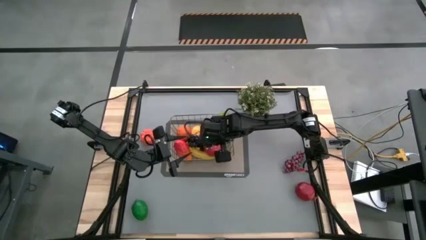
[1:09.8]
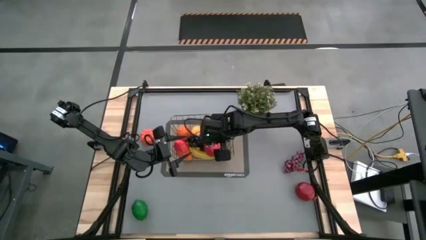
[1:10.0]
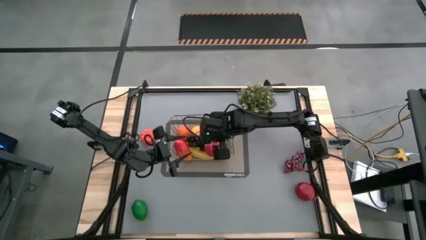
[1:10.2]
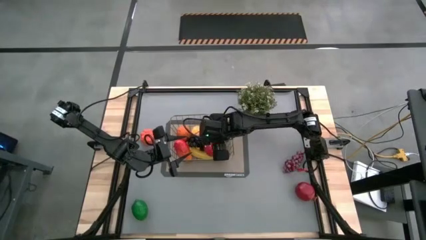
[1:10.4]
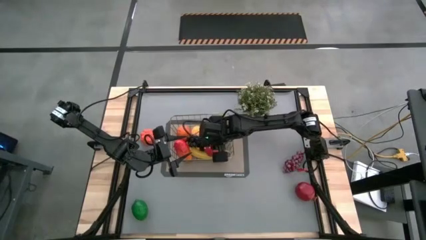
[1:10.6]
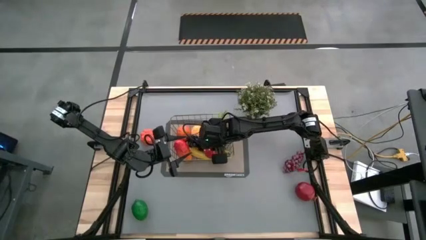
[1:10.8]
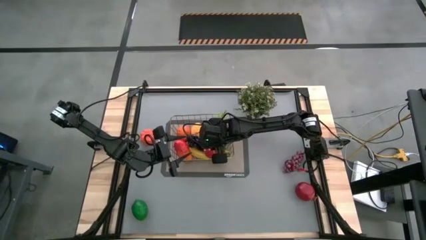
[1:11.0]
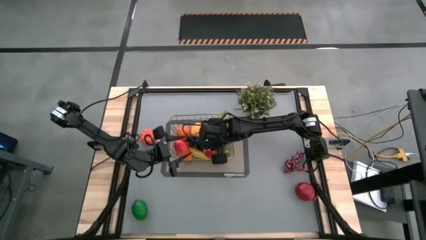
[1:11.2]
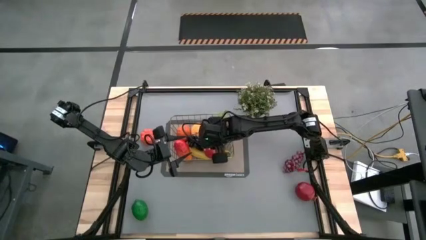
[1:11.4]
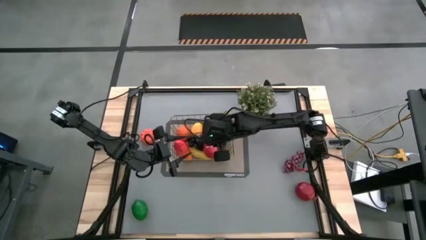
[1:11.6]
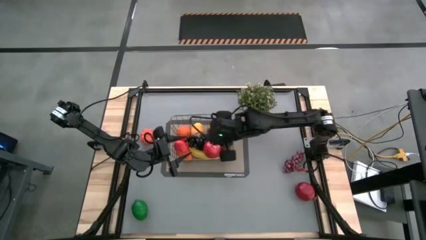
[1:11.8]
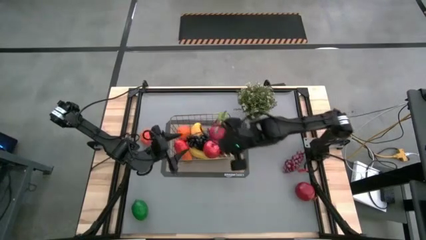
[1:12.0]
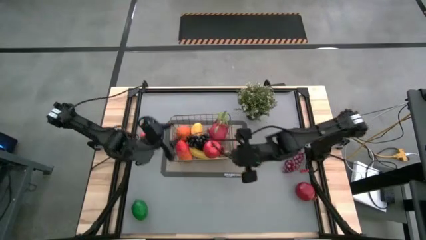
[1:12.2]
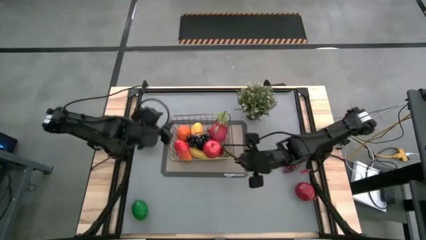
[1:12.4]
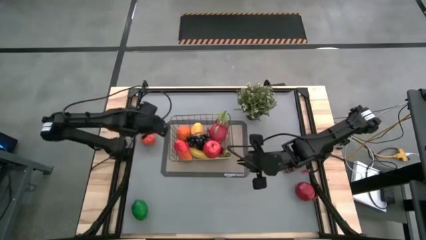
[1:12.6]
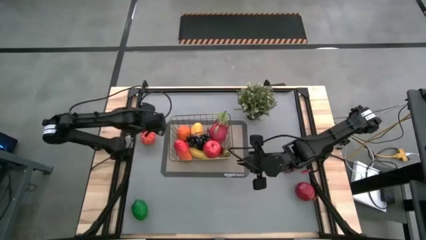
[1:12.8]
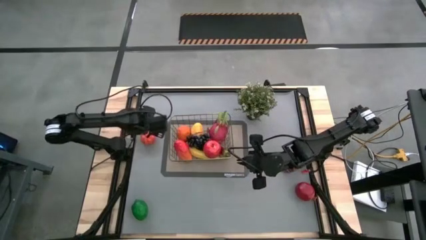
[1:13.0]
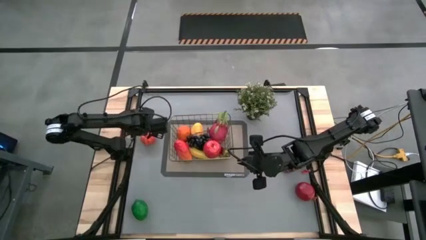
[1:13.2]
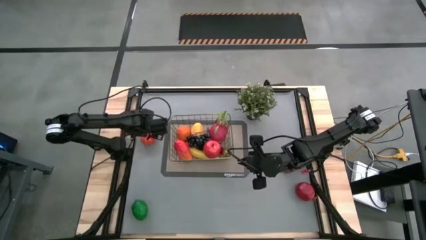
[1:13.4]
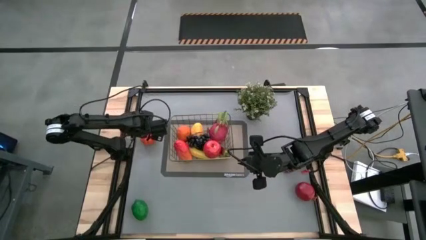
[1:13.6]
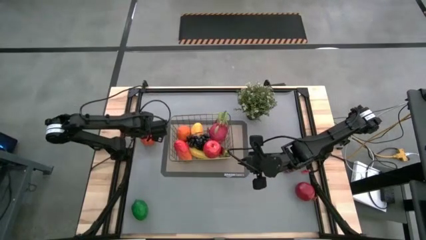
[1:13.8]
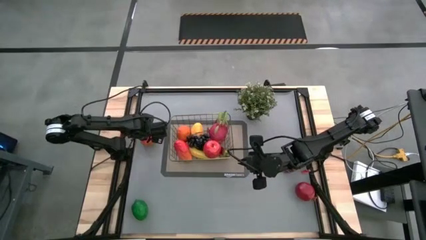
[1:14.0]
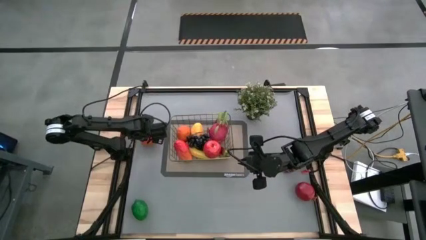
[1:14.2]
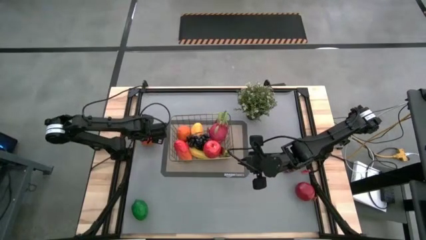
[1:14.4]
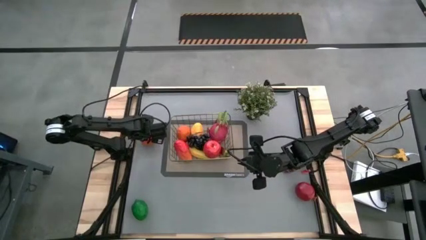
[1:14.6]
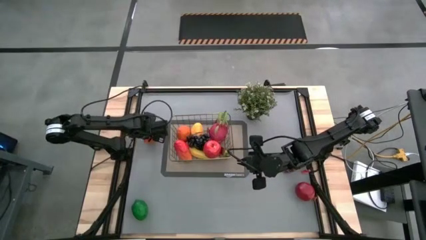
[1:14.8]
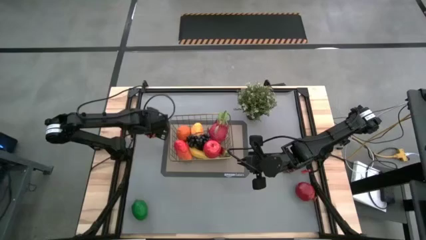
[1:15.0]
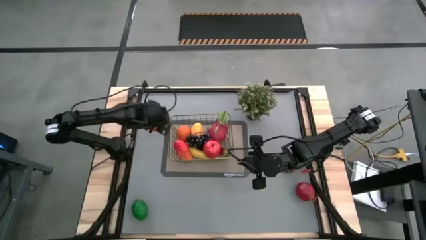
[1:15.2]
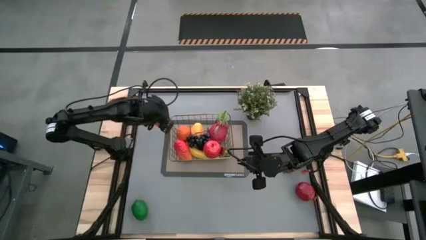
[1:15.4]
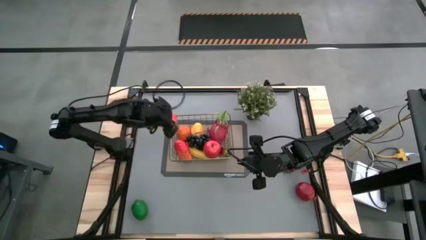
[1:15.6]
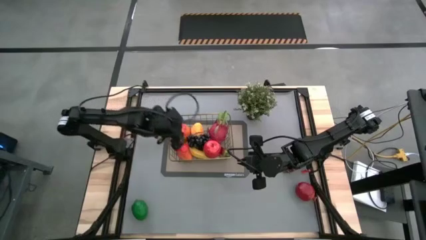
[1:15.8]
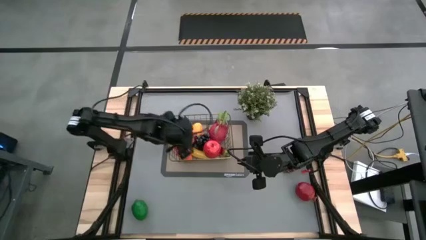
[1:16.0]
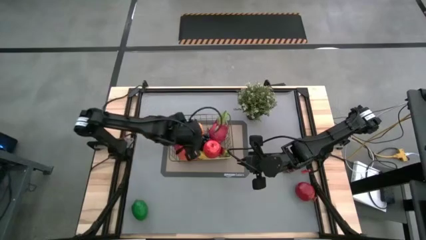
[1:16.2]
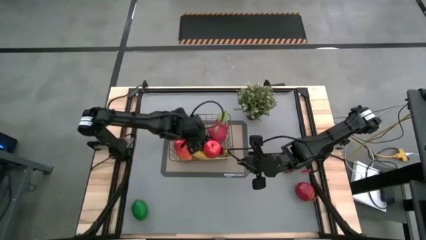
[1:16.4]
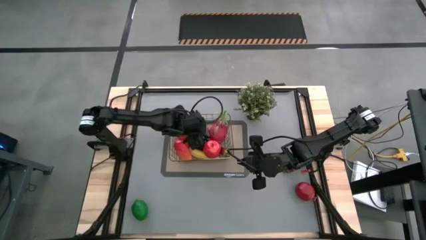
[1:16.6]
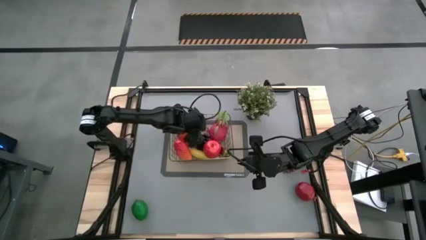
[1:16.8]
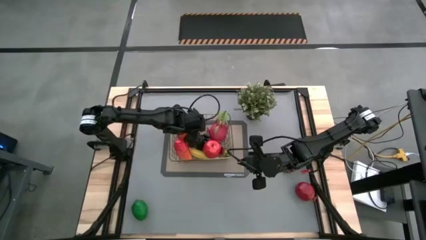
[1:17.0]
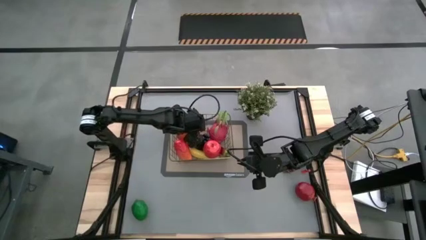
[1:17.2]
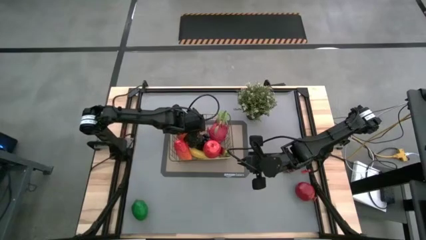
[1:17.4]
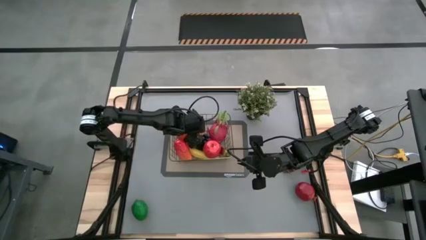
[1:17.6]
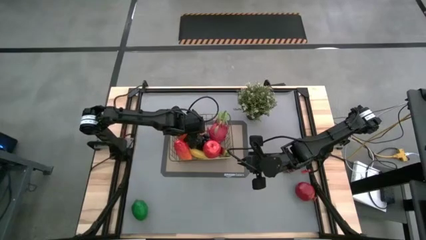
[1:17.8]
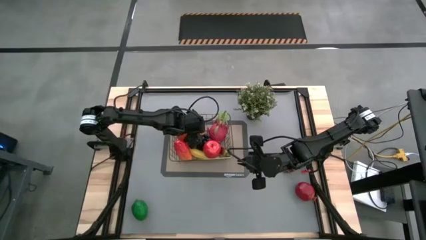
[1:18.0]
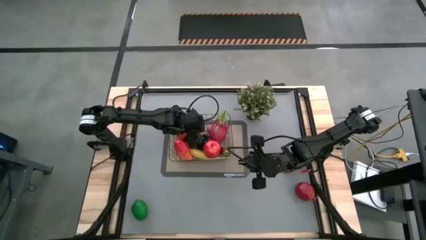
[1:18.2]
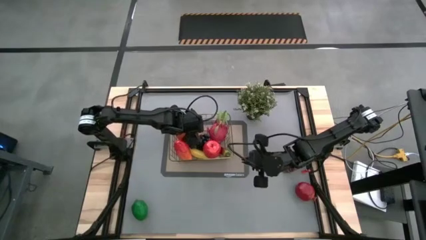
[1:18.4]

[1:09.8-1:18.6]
Task: Build produce basket
Put the pumpkin into the wire basket

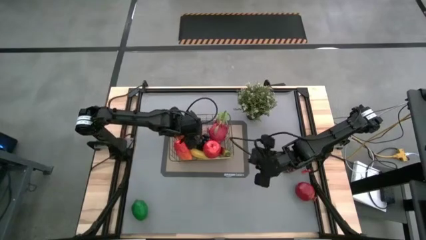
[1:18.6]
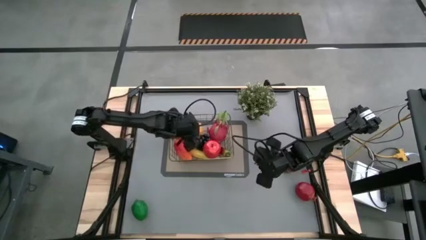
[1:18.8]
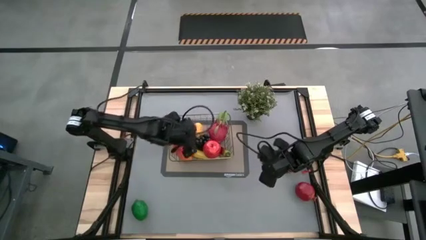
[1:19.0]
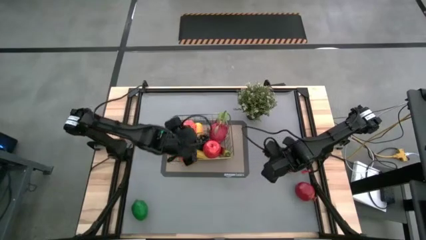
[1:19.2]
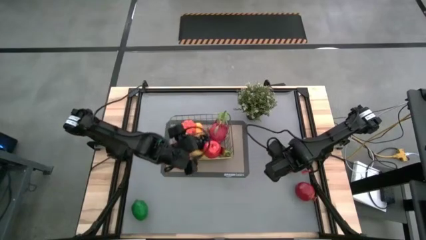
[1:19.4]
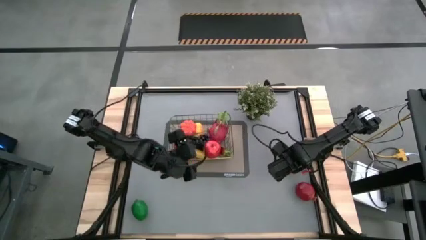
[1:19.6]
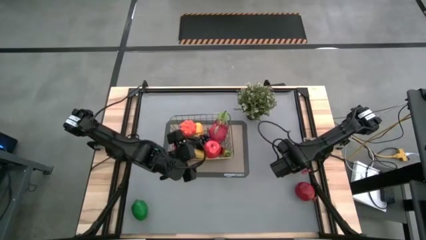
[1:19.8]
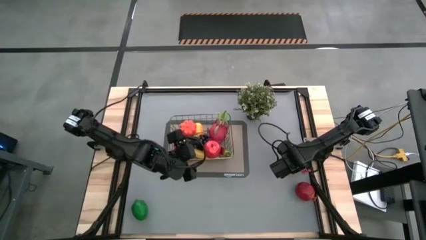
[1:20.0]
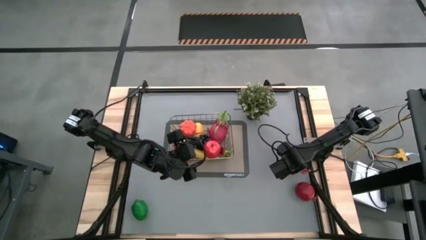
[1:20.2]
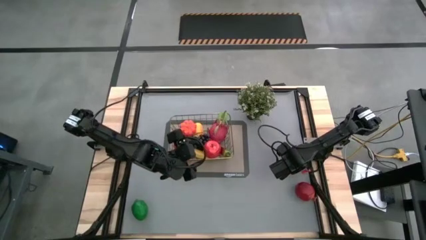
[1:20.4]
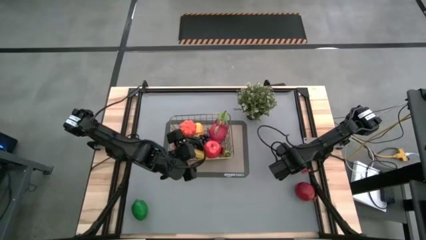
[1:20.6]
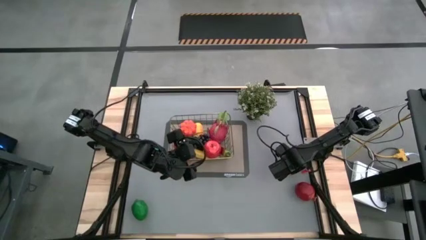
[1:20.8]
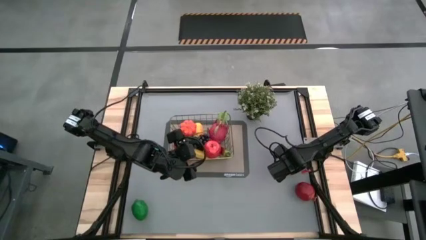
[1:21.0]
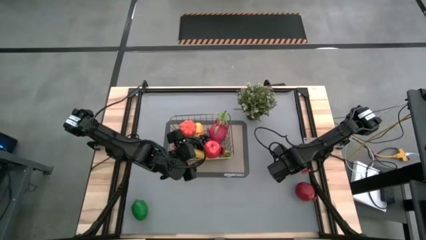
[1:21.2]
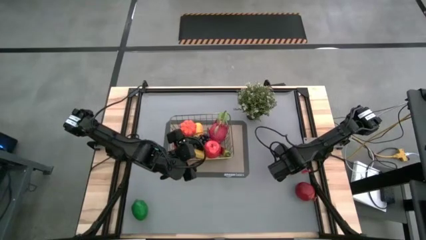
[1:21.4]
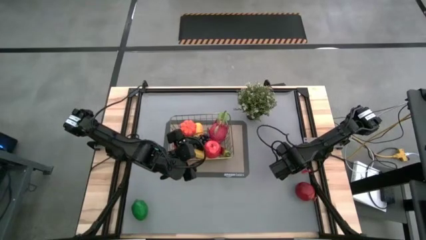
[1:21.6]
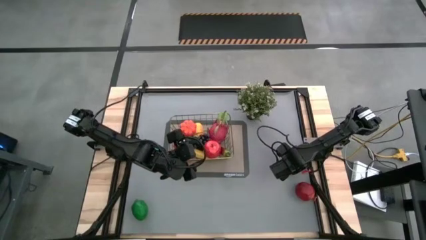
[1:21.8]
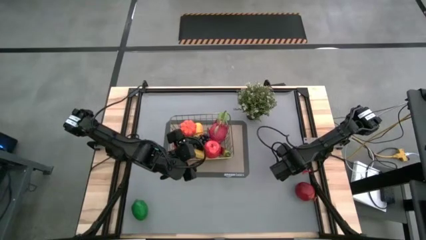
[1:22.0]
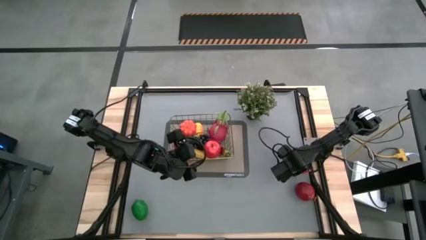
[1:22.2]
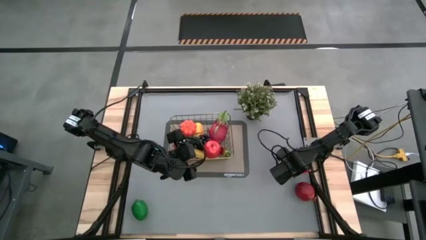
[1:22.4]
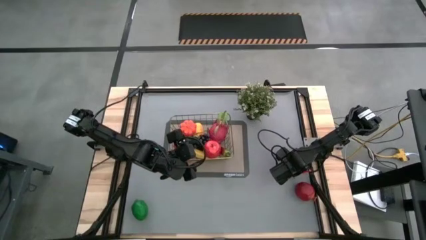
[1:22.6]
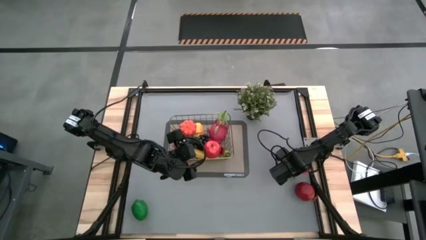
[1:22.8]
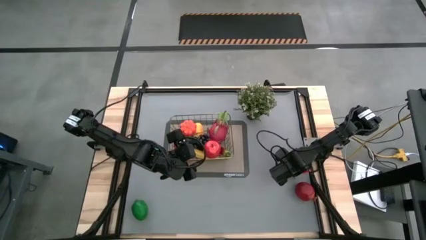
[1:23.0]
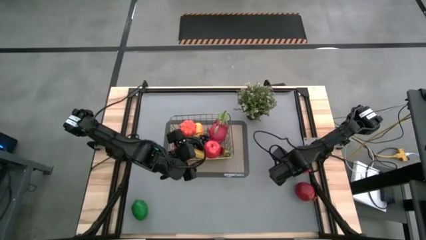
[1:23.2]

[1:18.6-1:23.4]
Put the grapes into the wire basket

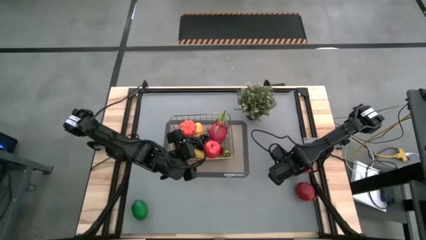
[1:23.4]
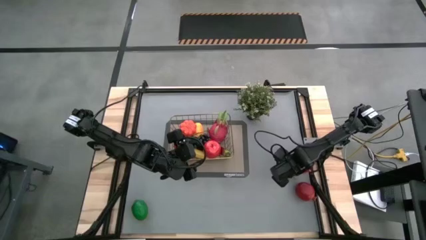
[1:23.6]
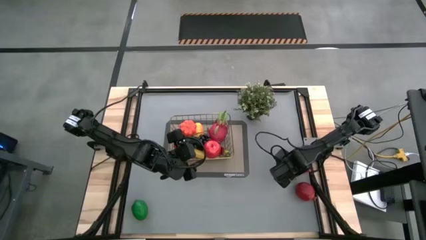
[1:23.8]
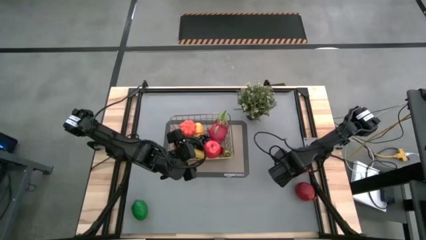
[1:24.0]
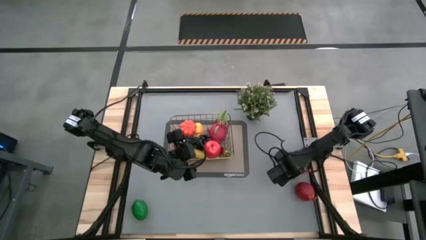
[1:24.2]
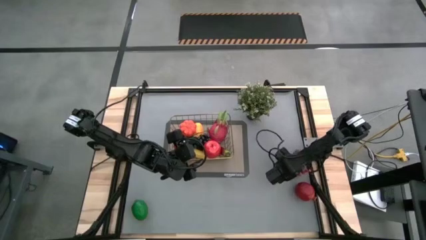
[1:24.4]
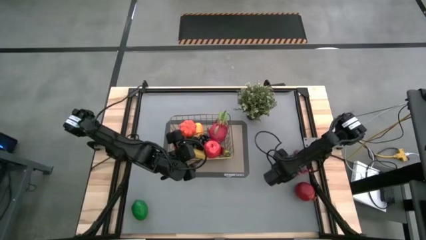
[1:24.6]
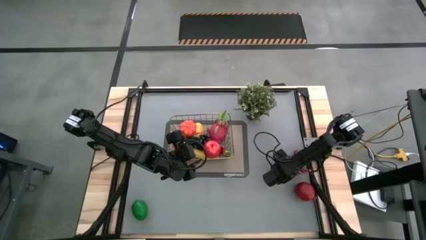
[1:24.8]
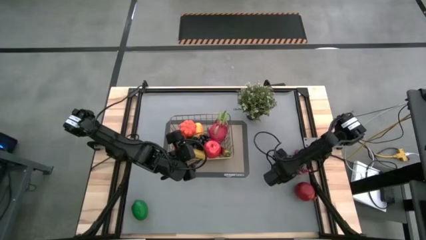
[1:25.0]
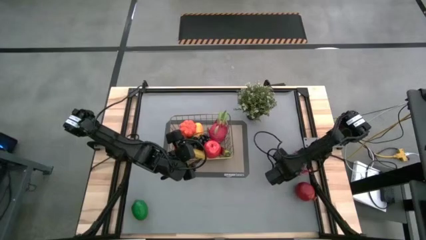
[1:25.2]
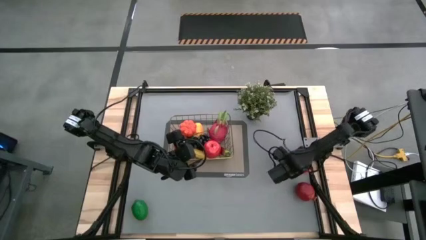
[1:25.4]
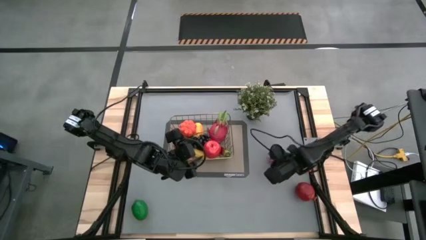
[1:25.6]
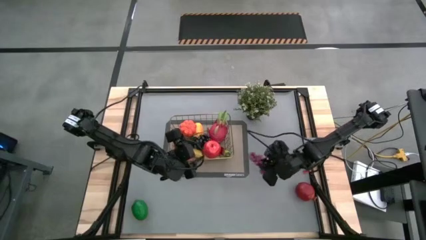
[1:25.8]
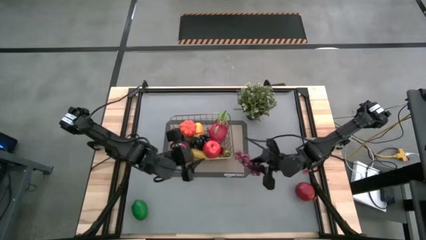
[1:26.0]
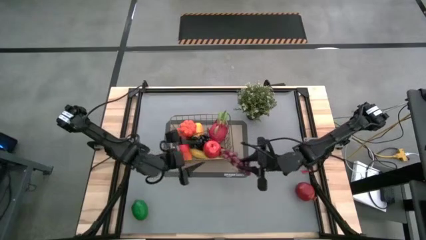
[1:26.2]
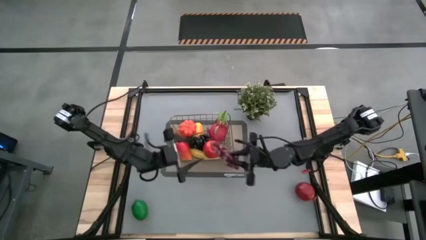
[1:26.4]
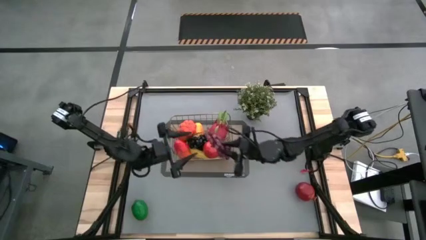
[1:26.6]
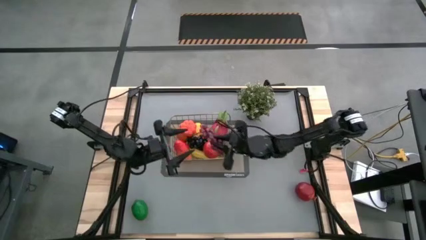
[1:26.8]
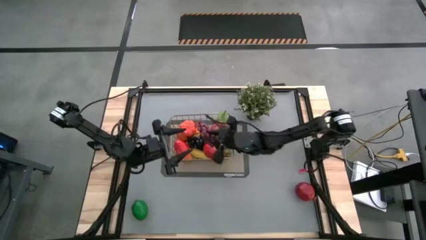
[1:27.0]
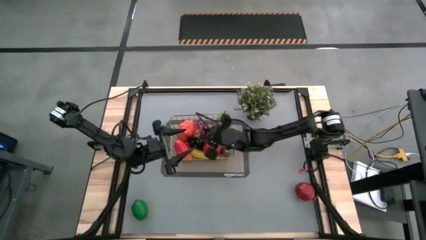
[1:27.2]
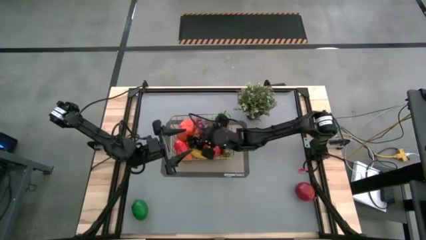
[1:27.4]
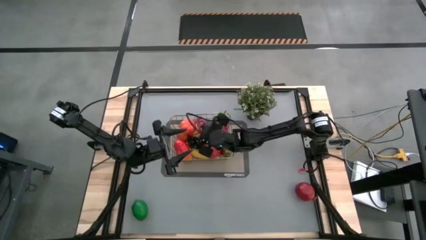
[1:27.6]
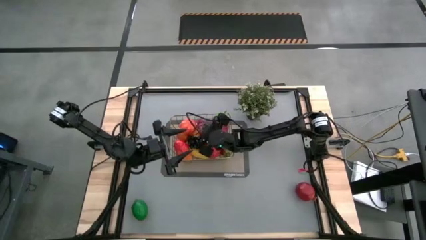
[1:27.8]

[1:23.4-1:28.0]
Put the grapes into the wire basket
